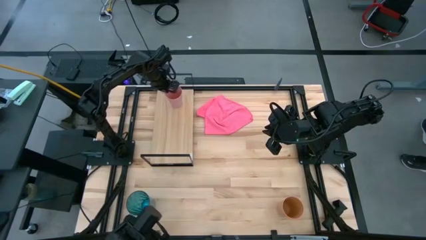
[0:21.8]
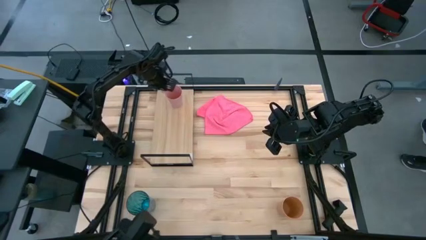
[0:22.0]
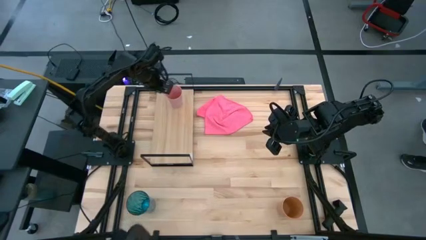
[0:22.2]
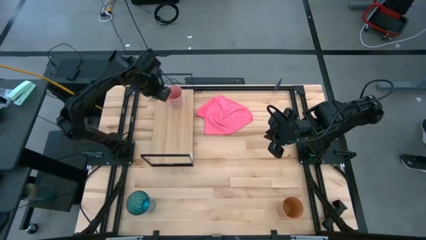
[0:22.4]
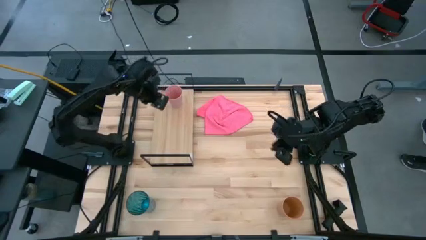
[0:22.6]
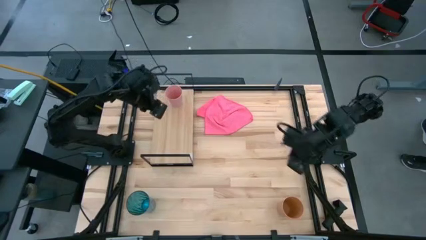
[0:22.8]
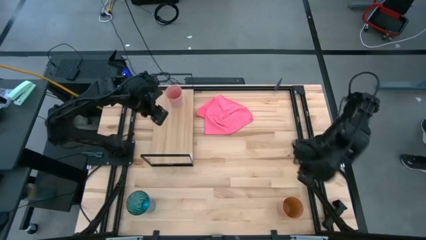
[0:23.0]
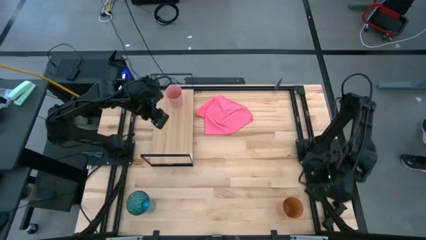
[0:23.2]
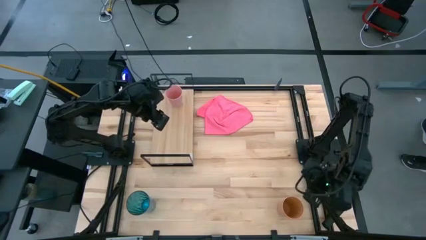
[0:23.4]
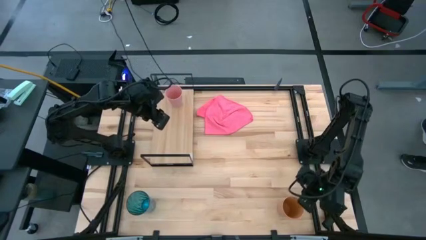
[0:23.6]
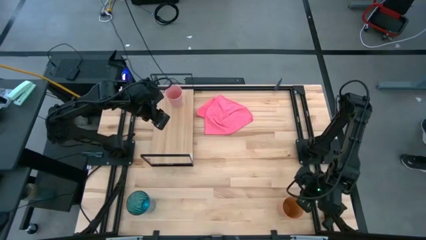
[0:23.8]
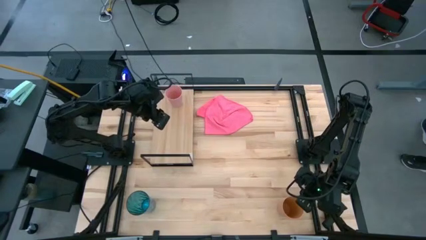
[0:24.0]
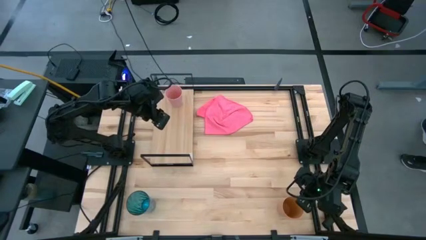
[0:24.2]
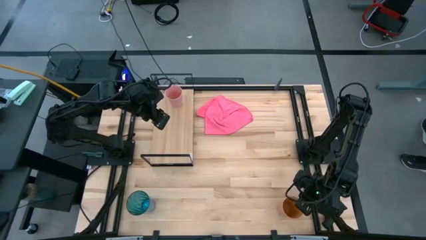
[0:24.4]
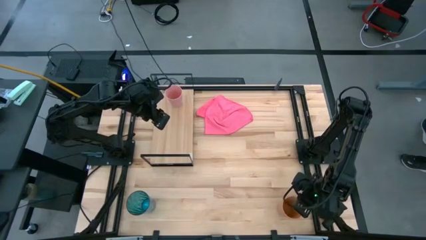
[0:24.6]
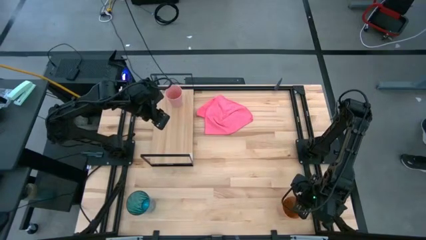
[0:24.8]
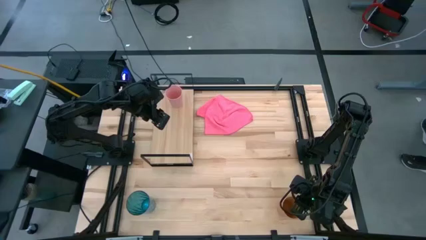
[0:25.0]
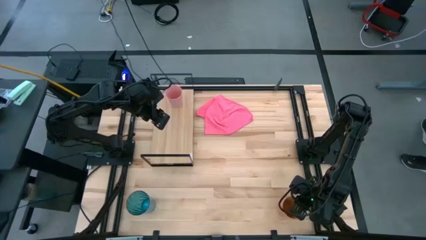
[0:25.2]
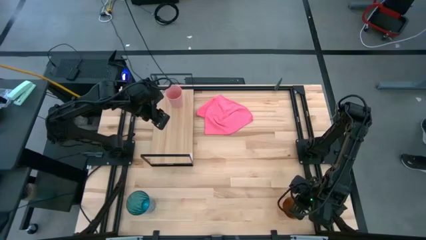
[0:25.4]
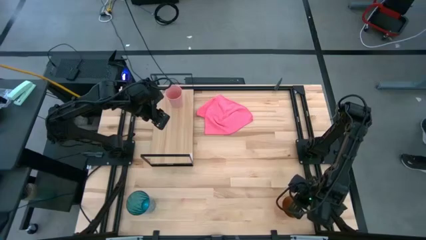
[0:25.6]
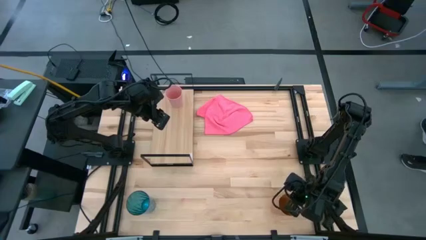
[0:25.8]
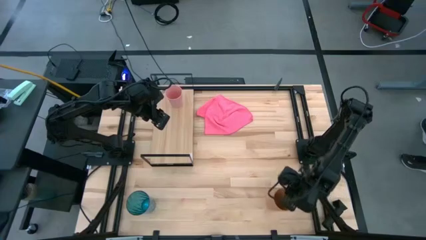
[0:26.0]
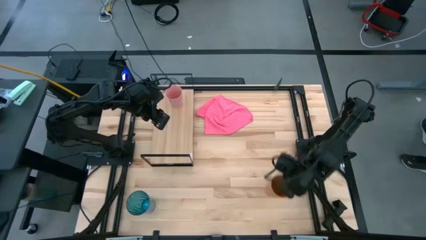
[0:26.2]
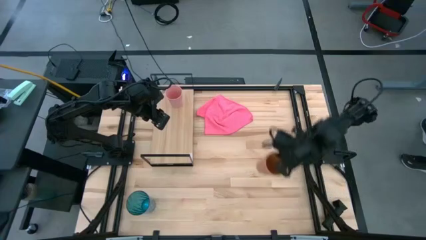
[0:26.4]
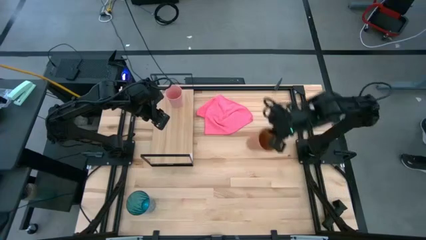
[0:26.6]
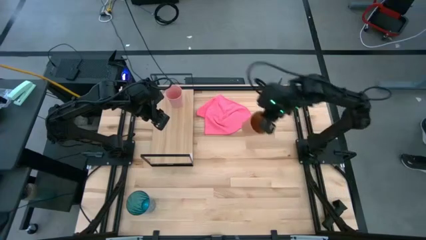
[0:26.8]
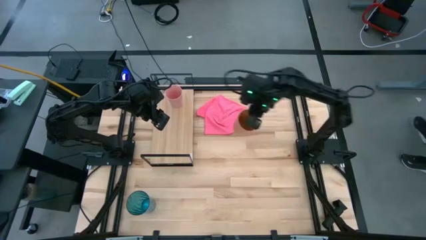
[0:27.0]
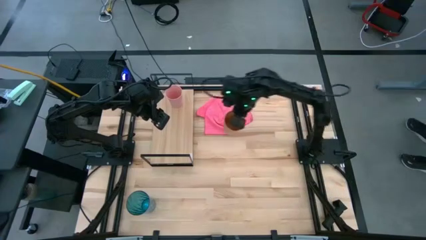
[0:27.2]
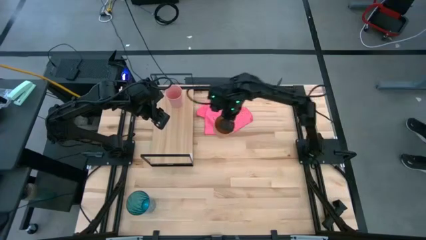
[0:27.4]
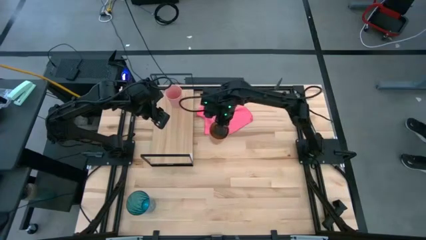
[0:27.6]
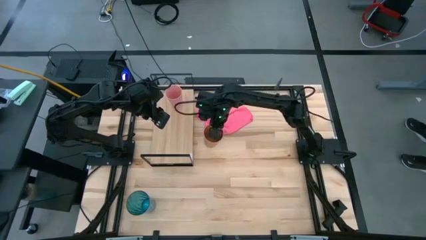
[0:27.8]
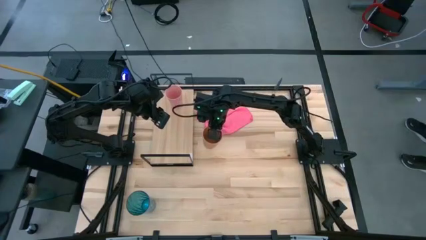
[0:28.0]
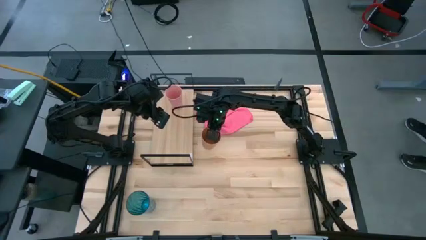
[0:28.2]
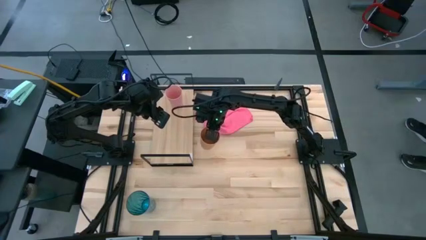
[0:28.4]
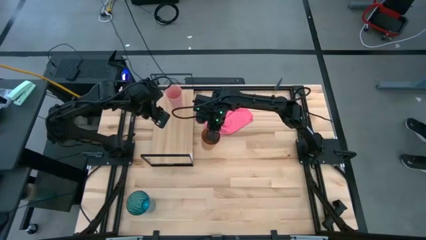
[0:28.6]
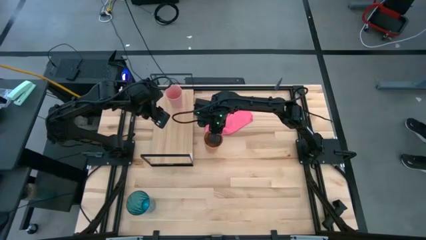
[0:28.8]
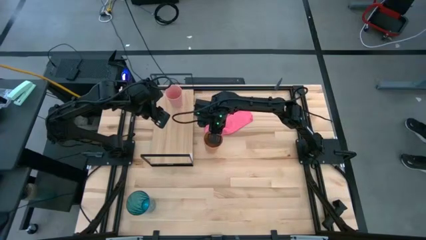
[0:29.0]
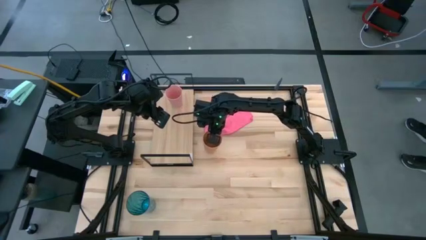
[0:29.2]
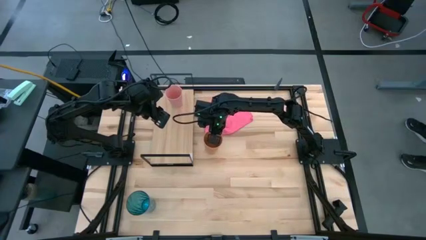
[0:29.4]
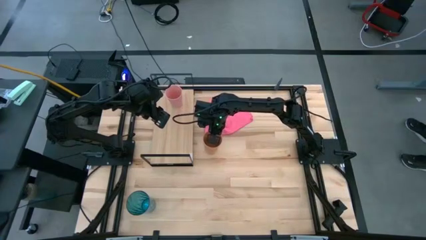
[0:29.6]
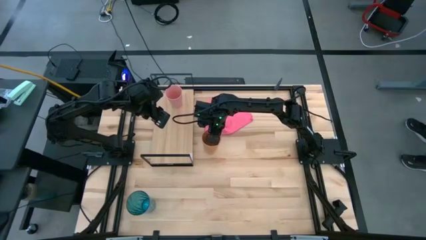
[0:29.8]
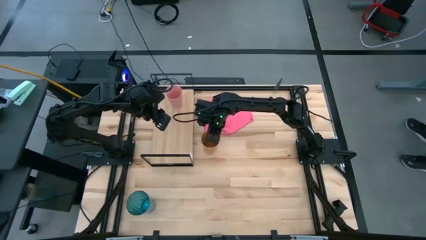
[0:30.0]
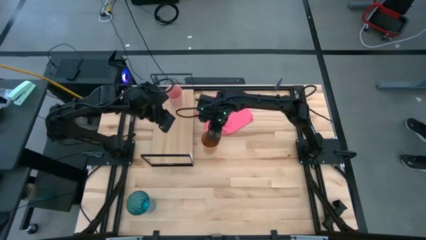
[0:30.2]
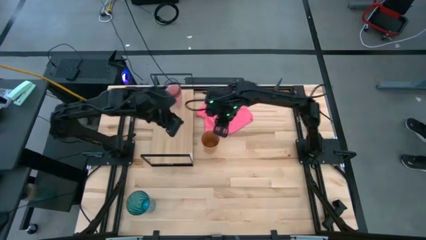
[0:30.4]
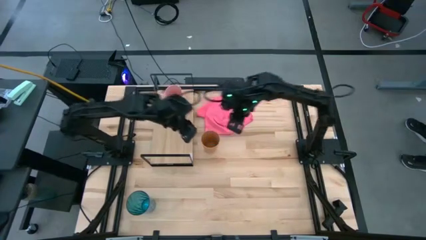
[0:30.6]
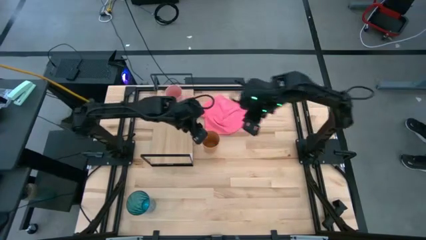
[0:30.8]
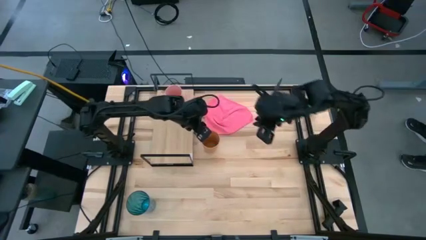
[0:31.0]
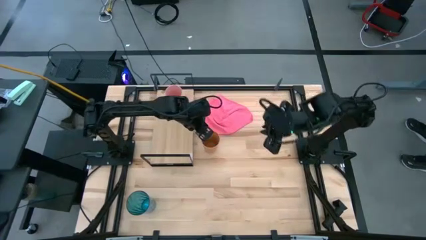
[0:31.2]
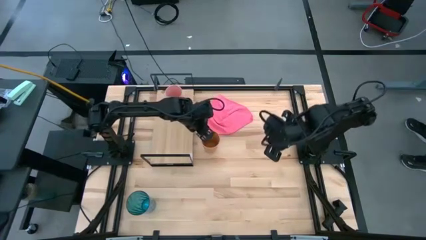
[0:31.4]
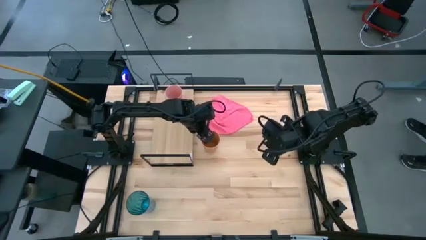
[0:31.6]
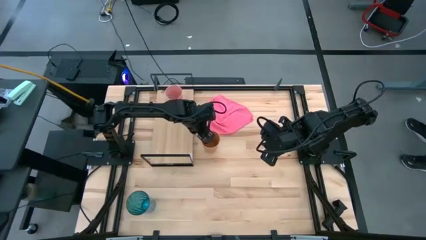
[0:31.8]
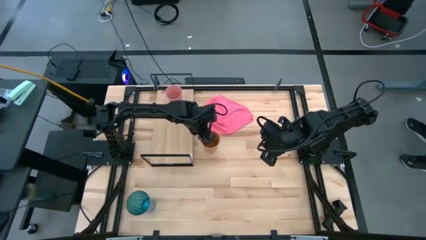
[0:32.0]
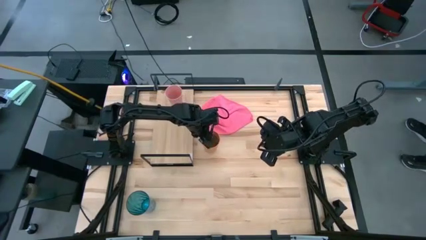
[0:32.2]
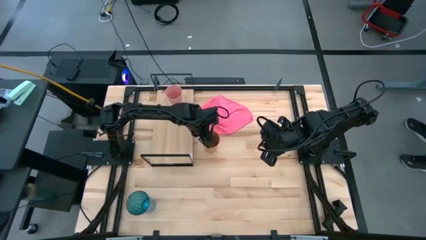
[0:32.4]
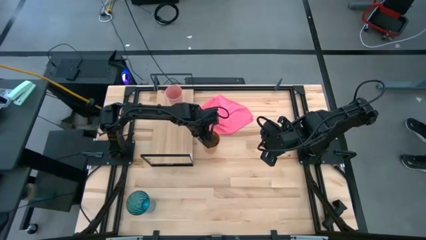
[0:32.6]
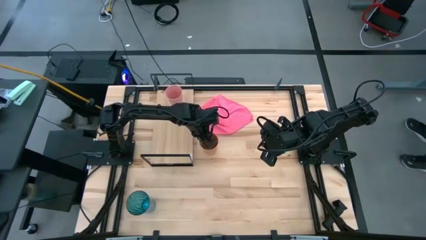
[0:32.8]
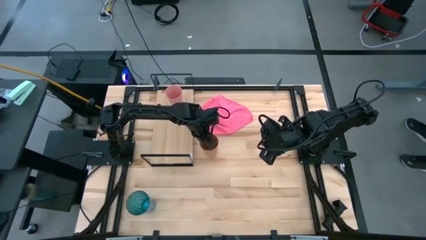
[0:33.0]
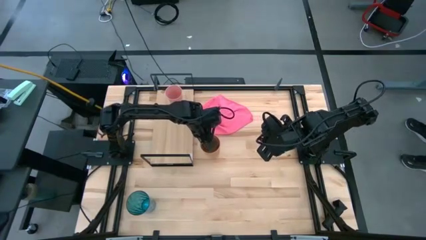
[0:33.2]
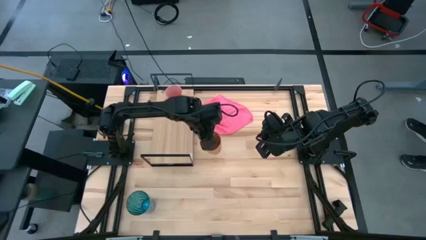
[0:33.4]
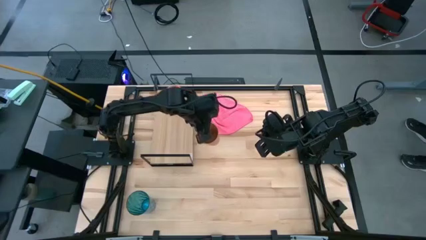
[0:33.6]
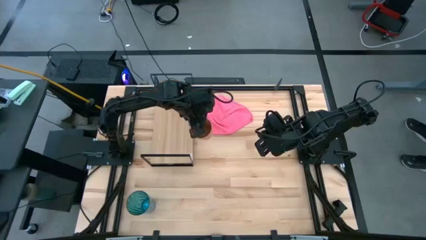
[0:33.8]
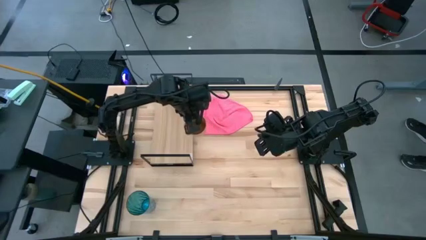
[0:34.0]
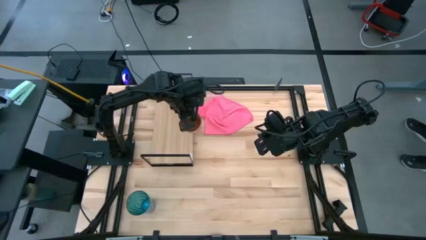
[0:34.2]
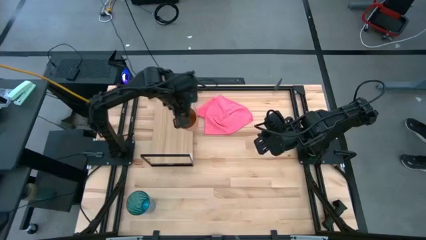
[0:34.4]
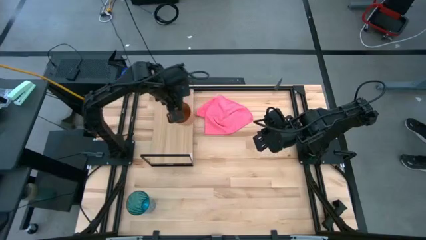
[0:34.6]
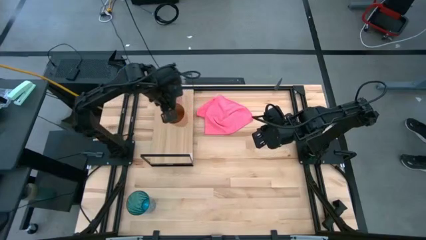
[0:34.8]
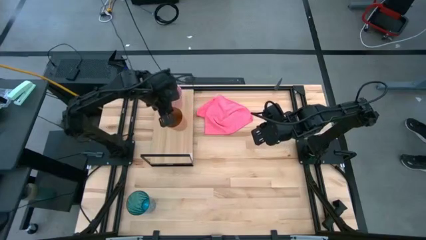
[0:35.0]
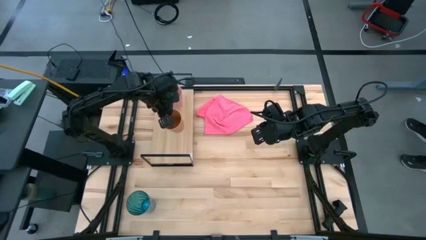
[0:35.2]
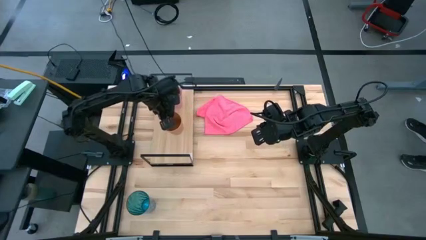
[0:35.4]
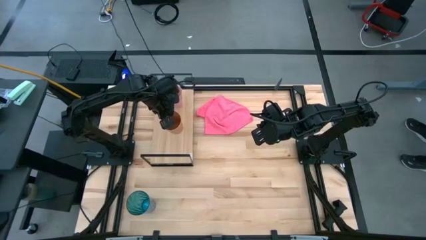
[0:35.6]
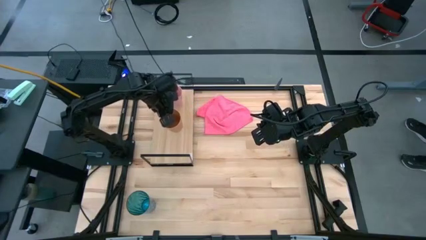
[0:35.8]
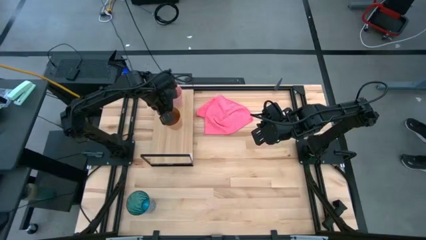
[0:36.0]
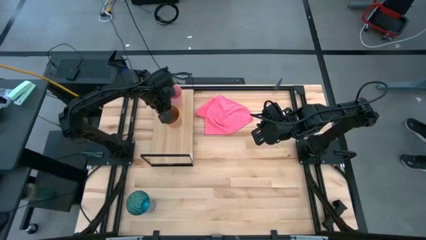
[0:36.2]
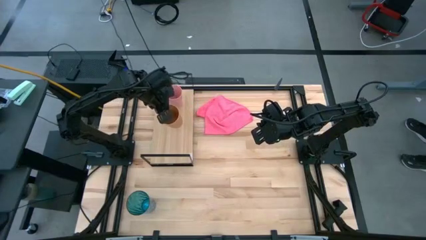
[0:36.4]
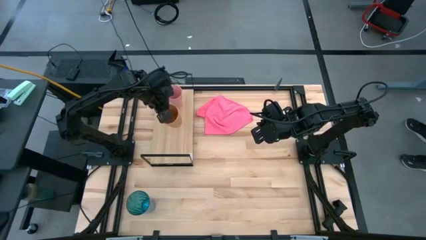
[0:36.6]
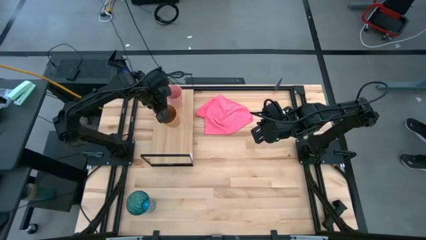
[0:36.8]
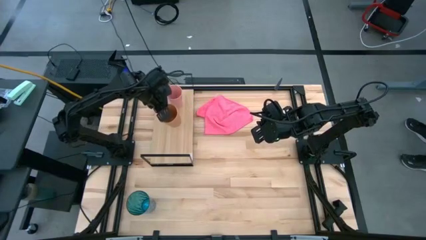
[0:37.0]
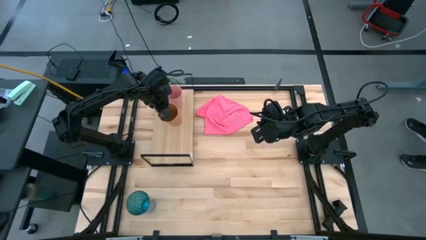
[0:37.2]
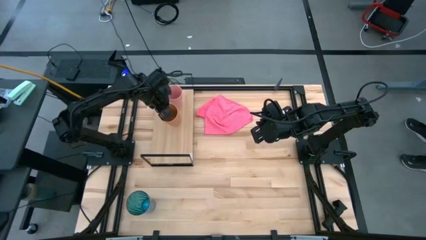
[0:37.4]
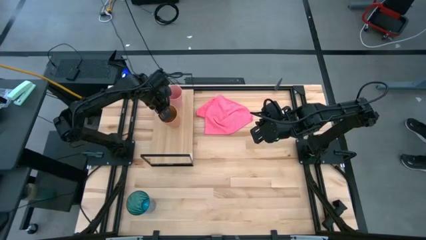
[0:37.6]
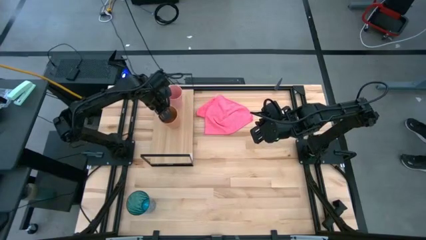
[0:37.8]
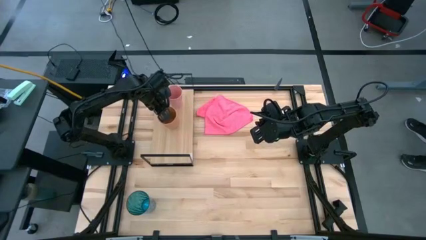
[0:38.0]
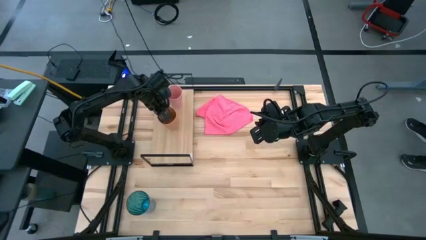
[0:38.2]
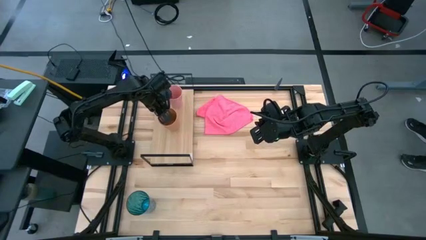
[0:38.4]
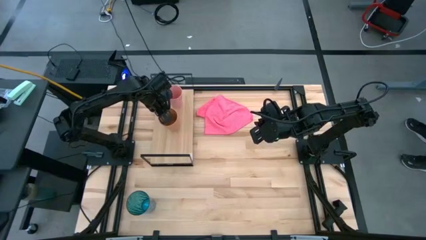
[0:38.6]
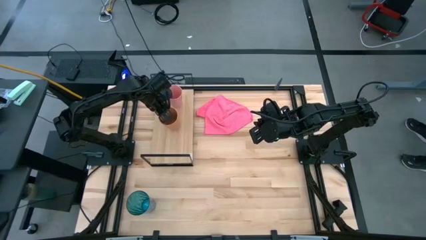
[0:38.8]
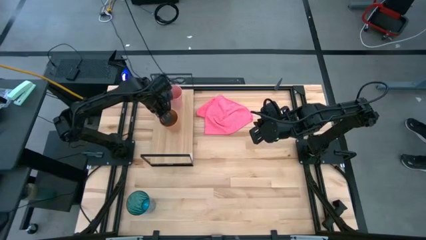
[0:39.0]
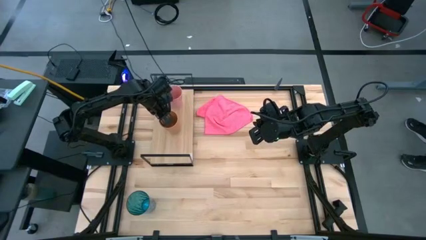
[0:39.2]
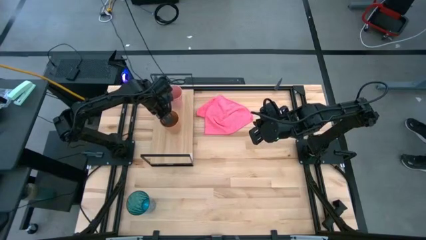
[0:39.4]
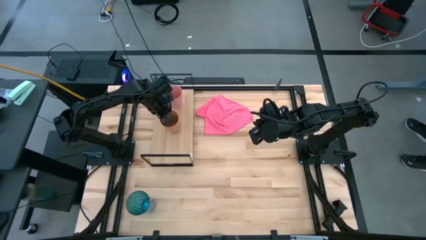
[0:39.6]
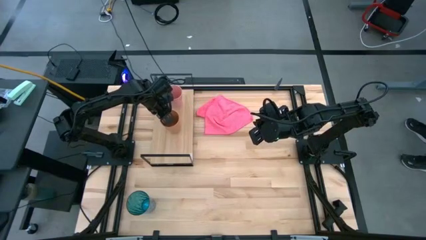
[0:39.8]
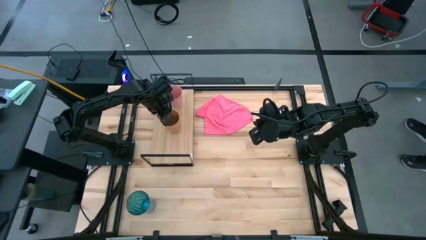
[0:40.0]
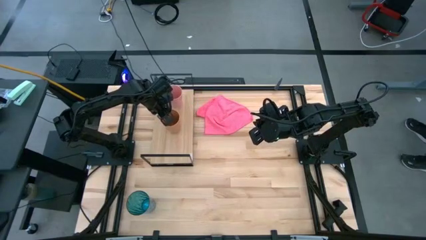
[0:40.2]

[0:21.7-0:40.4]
Task: Stack small to large cups/mugs on shelf
Put the orange cup on the shelf
